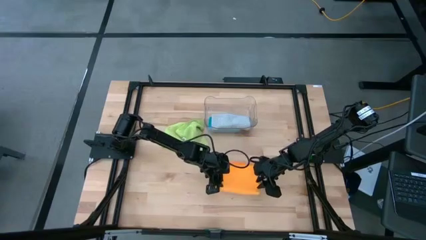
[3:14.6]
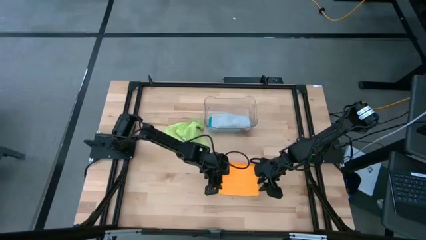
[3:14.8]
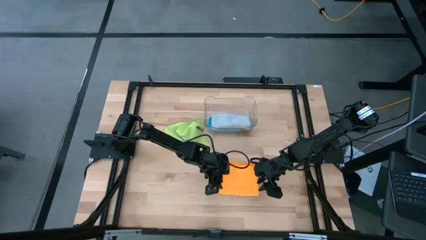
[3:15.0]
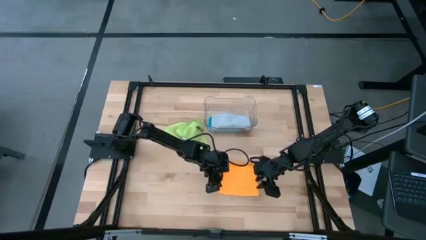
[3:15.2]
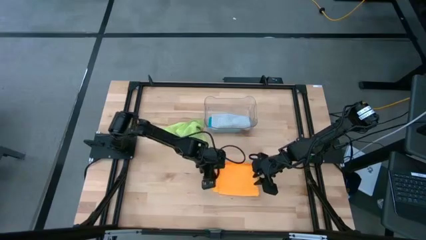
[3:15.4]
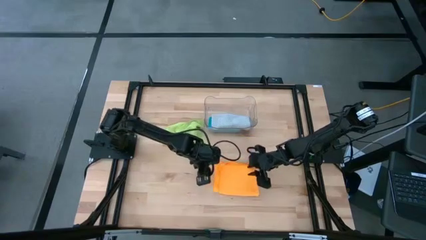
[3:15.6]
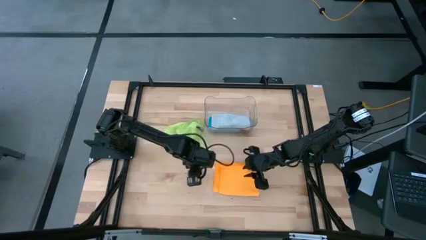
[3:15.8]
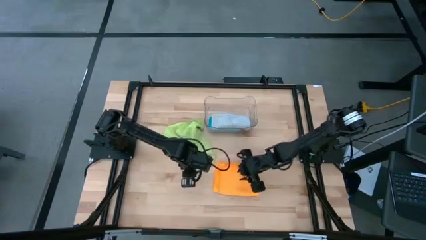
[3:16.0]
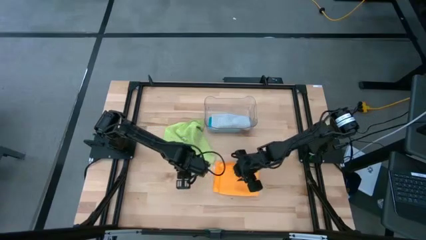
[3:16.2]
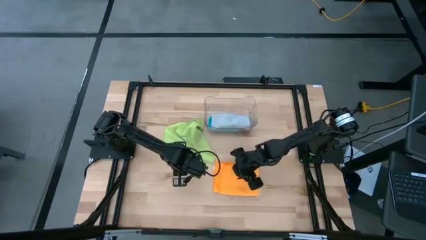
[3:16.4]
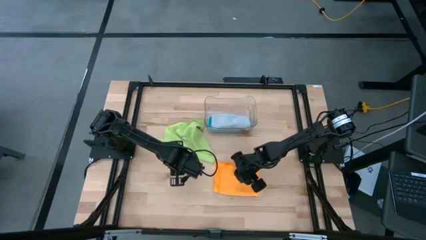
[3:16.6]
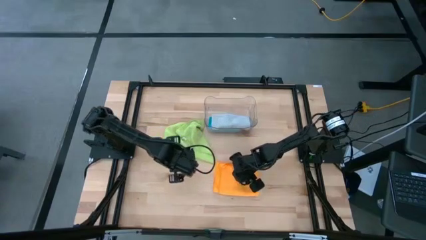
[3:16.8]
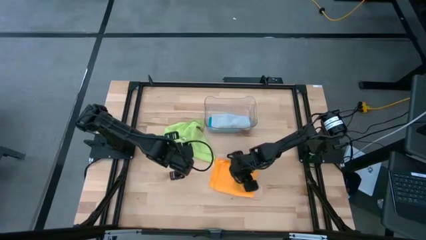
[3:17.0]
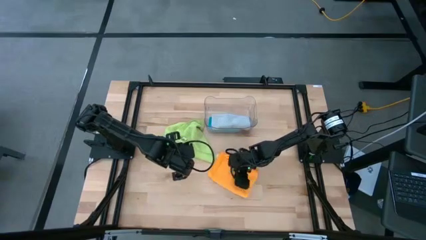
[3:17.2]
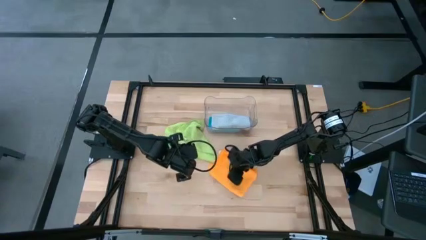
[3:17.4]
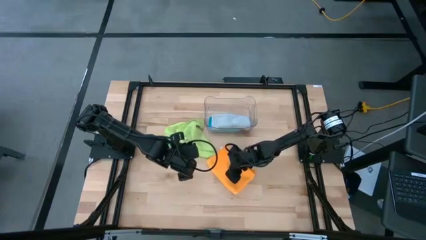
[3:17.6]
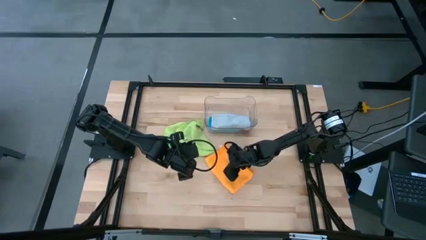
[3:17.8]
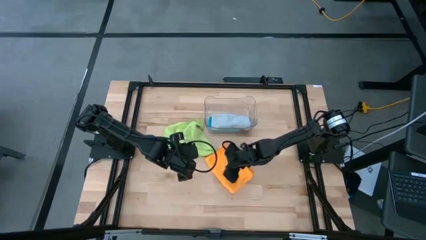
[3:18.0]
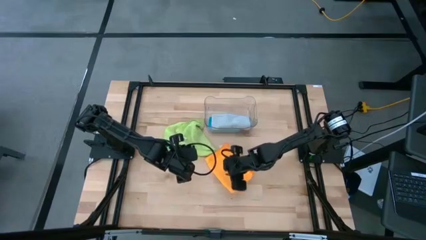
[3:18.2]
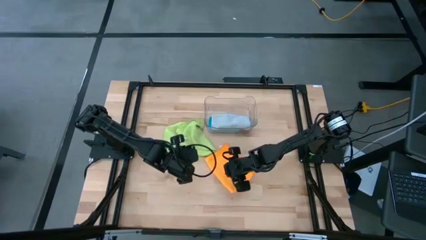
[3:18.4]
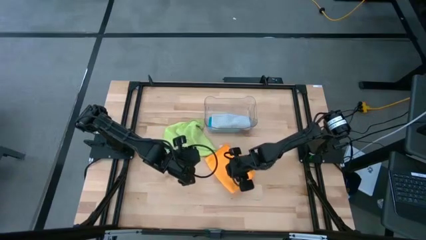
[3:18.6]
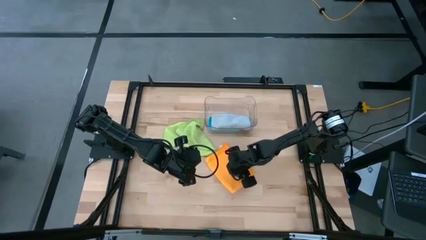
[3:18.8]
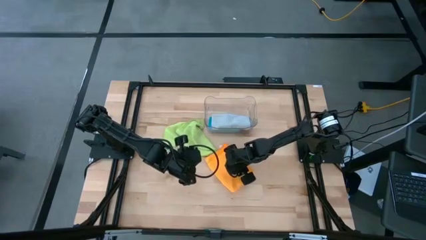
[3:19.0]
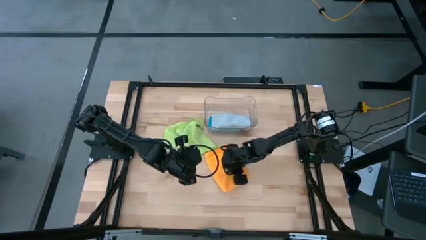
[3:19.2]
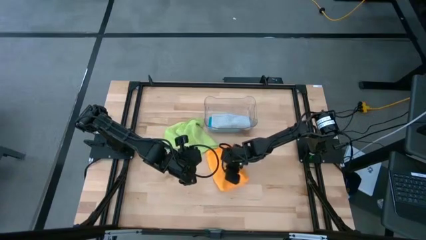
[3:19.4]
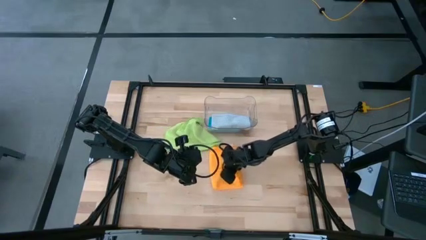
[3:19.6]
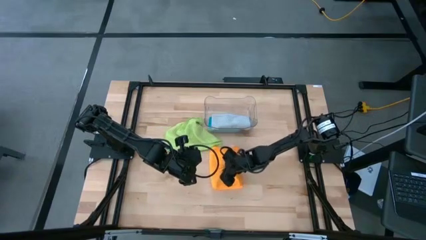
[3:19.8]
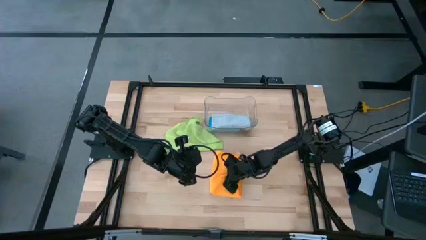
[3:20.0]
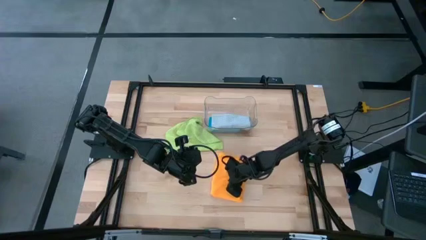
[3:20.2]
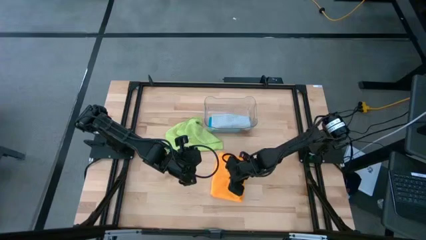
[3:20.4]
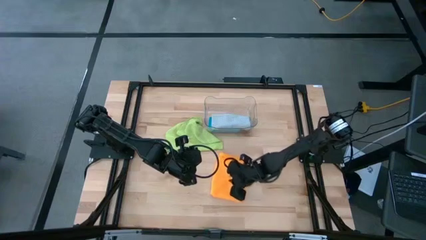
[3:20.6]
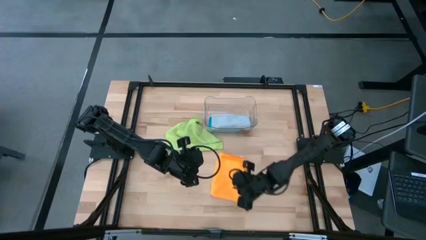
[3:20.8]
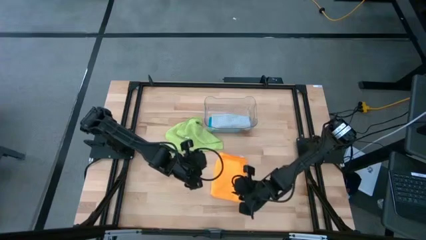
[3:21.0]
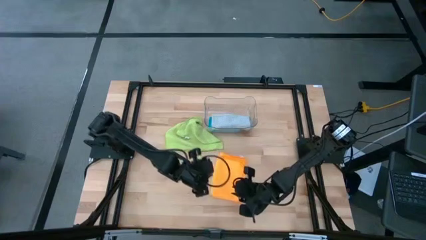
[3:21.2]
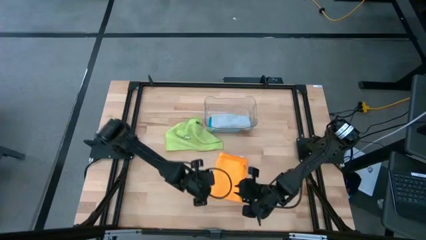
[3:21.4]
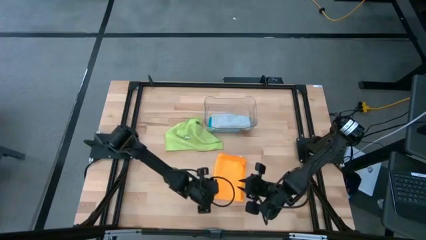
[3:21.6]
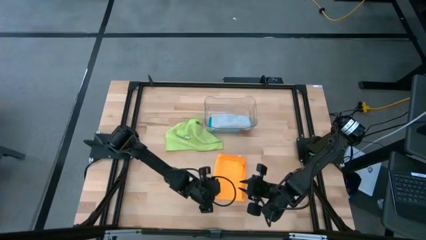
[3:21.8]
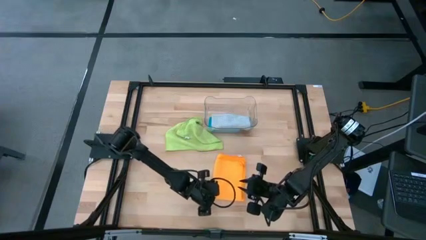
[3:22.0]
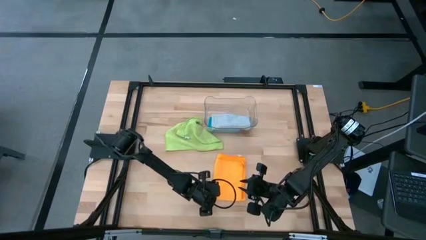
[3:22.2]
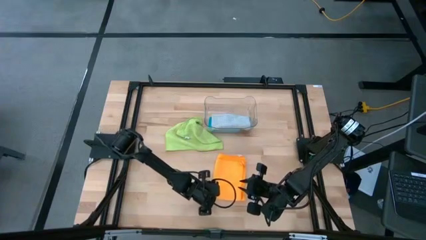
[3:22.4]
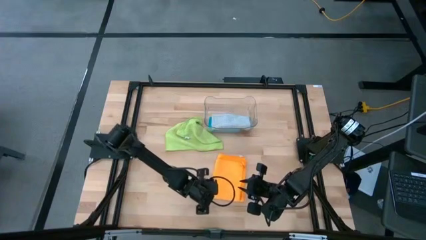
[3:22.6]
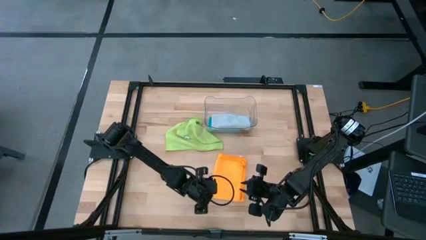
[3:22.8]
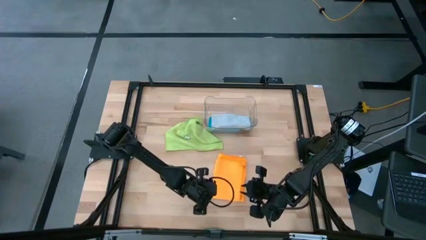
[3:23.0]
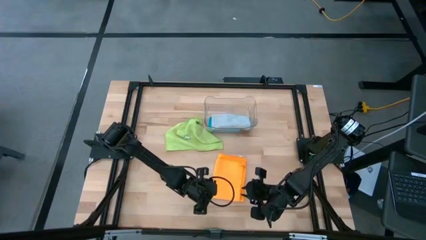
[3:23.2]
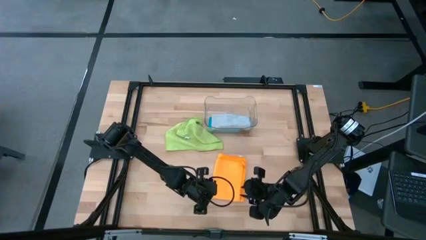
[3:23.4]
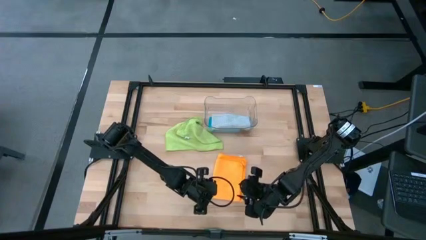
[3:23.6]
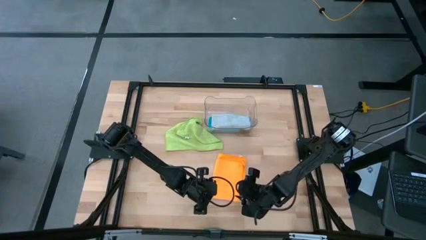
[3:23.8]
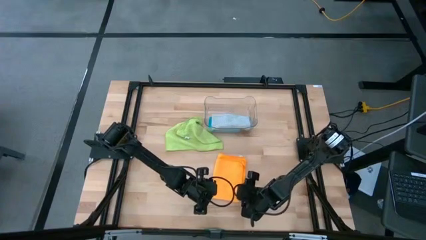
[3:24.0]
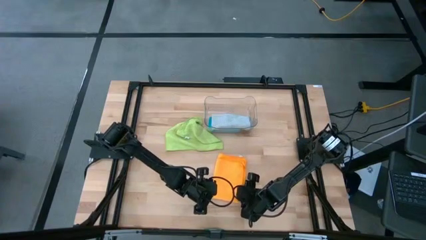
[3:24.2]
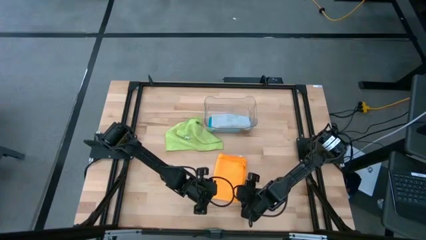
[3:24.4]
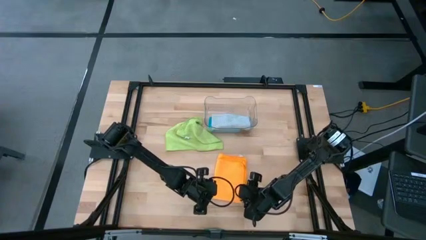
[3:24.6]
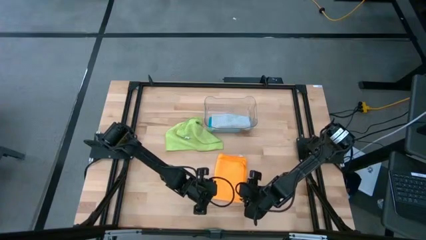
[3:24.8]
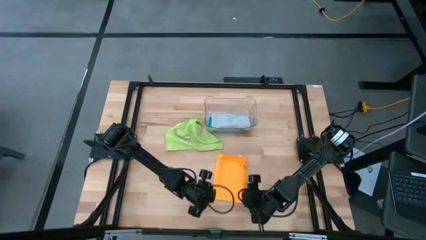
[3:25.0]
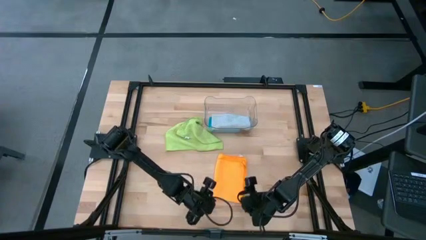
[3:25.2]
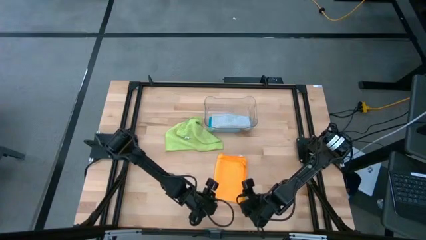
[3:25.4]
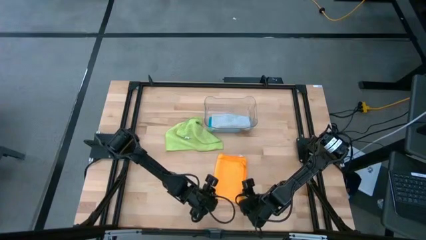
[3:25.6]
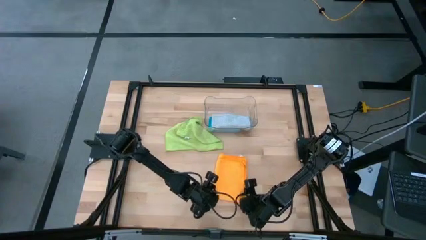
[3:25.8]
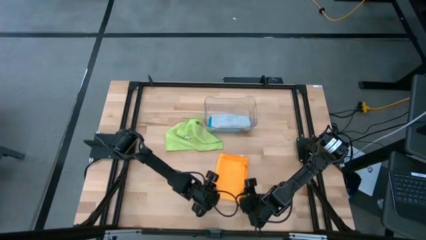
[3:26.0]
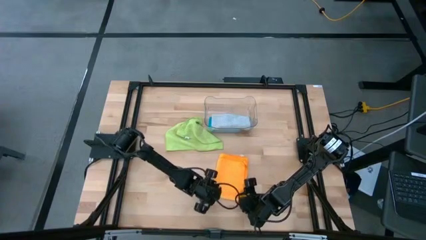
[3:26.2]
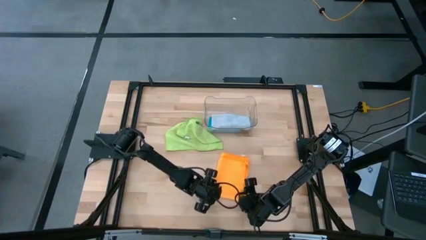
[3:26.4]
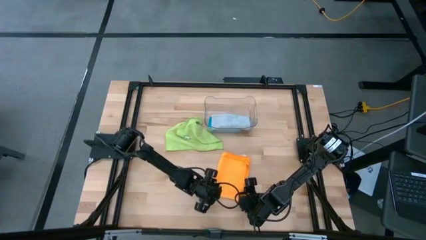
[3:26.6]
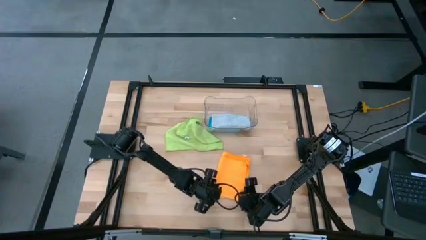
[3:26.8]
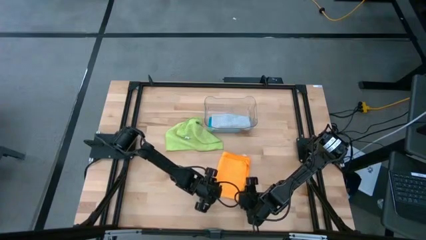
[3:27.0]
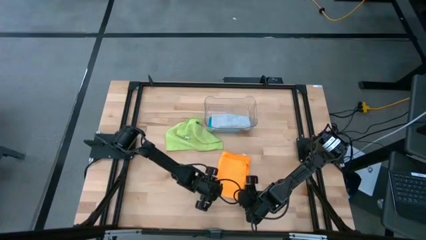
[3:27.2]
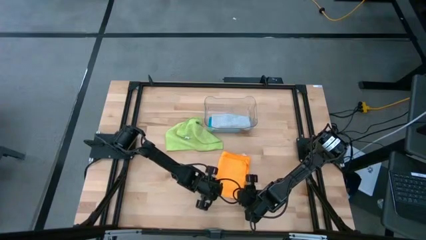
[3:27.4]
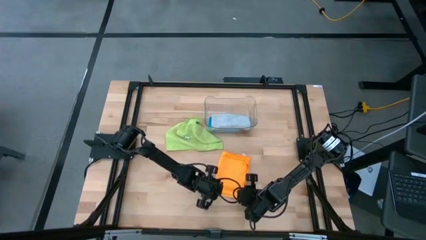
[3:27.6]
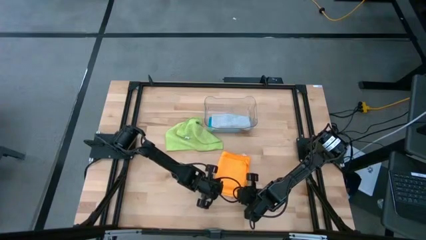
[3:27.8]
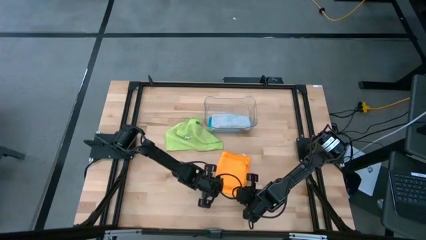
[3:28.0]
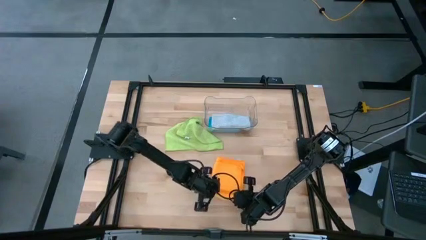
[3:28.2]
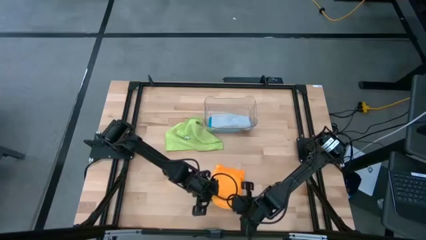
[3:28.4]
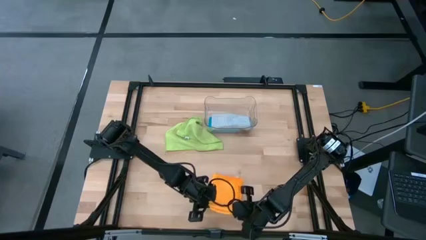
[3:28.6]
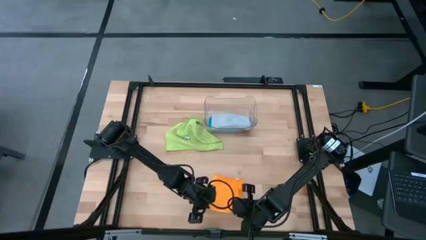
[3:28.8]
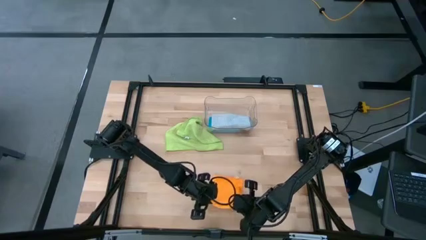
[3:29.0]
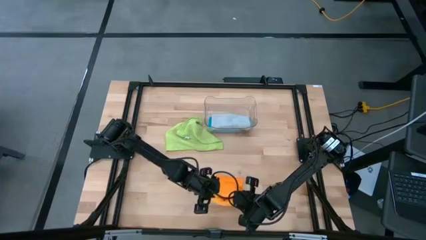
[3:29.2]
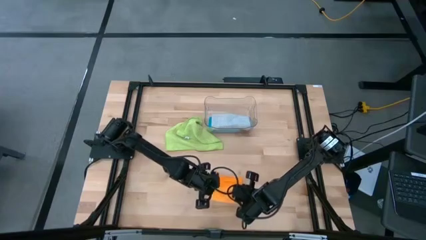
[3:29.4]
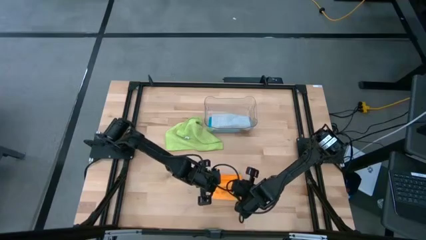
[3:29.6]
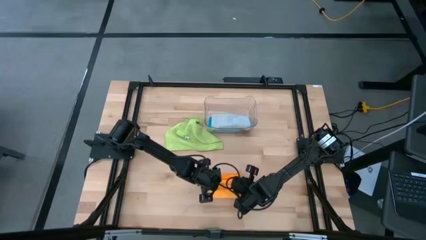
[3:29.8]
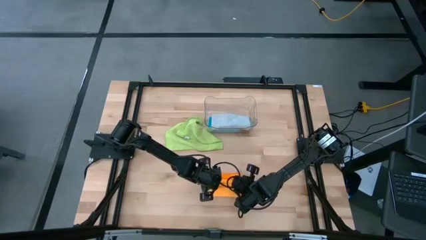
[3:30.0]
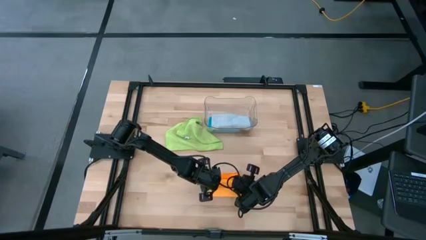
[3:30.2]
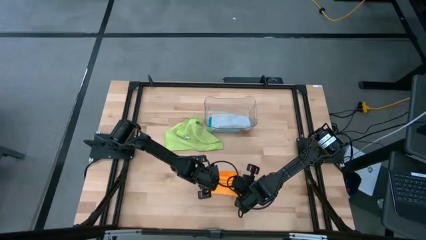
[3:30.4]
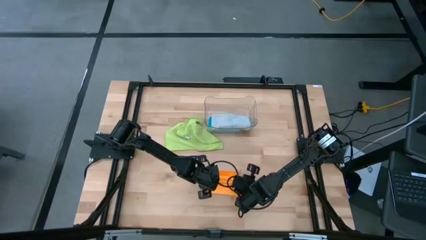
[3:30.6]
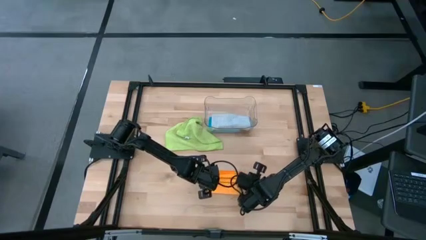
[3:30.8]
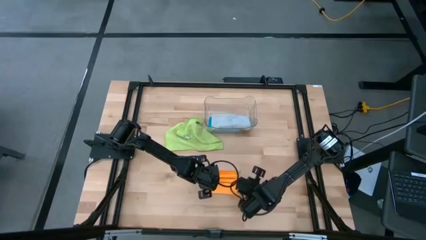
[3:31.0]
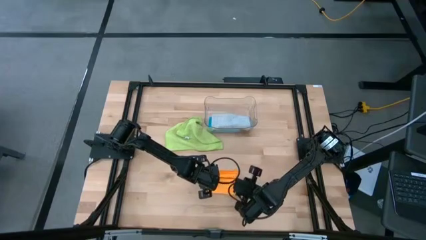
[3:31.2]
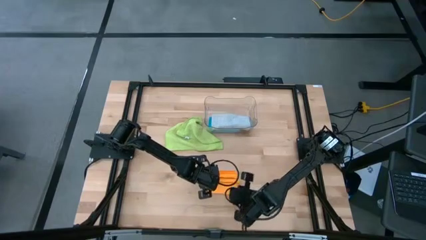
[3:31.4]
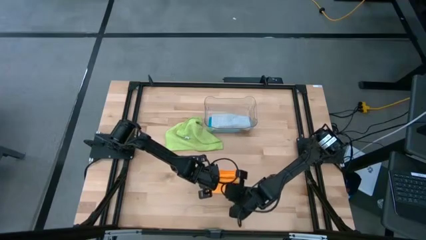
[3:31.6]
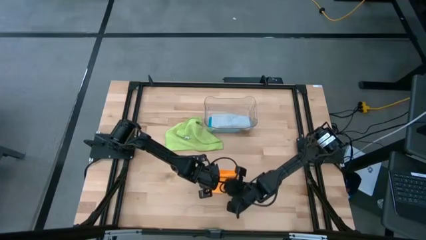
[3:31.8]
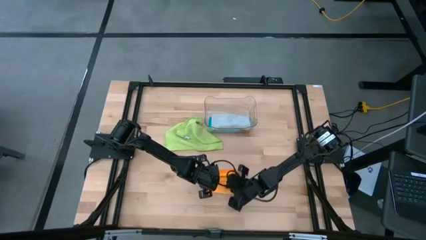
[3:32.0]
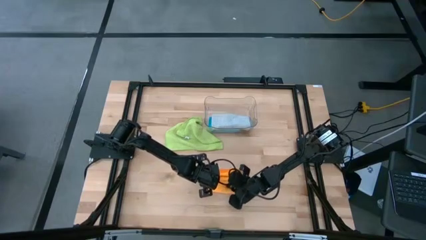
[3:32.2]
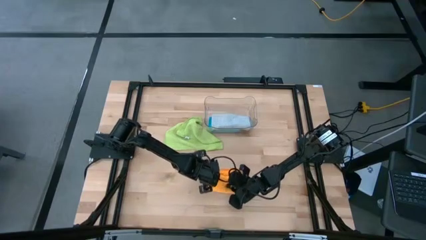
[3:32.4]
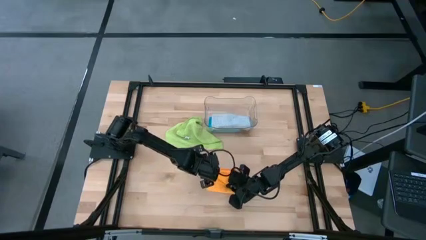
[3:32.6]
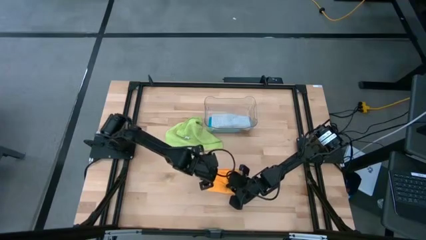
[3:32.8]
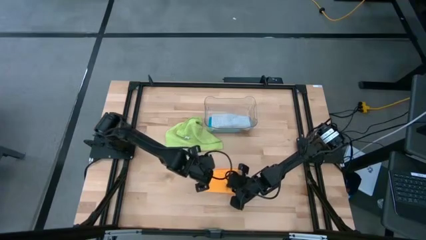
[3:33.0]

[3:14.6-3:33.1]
Task: Fold microfiber towels
Fold the yellow towel
